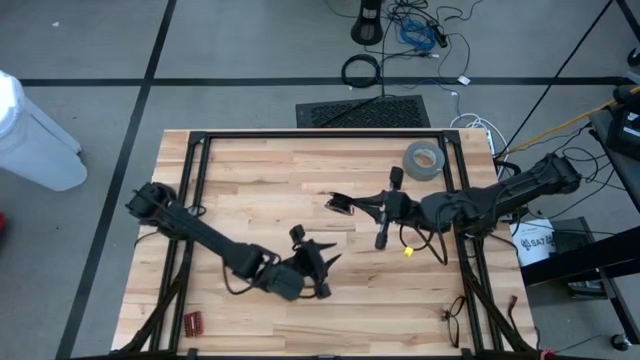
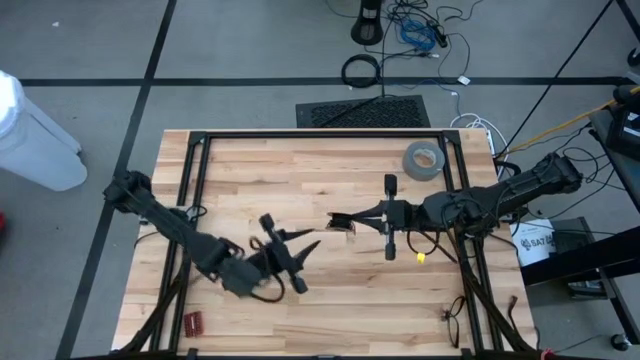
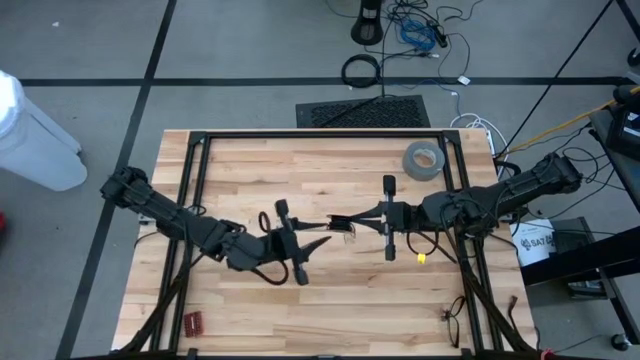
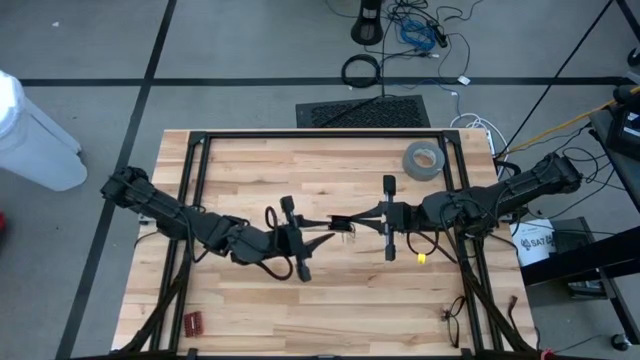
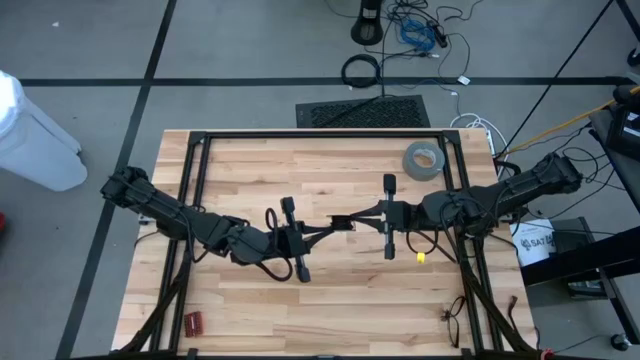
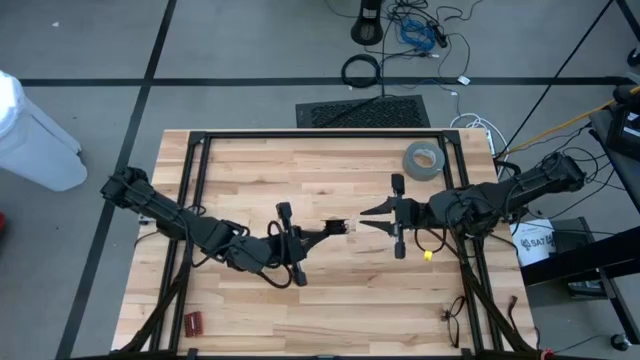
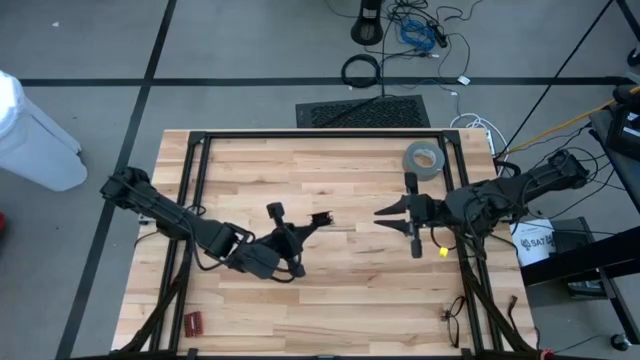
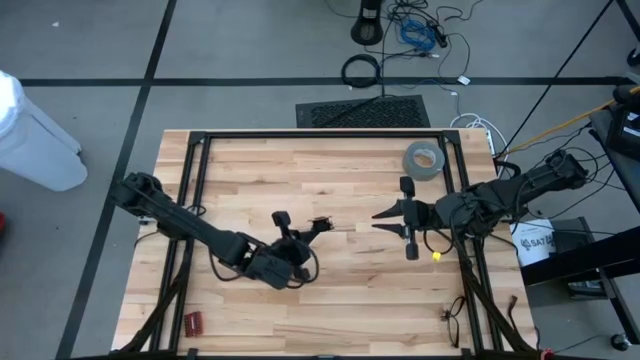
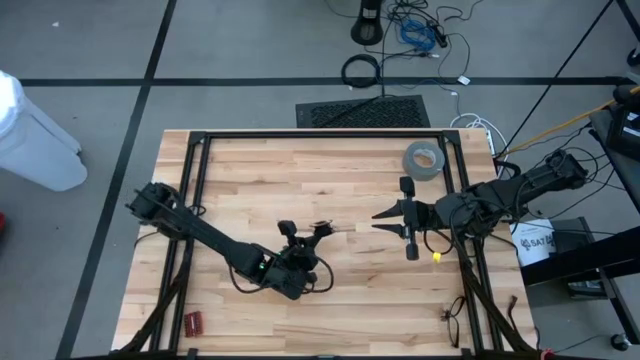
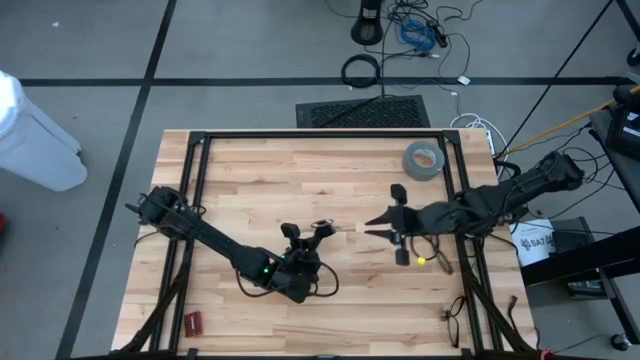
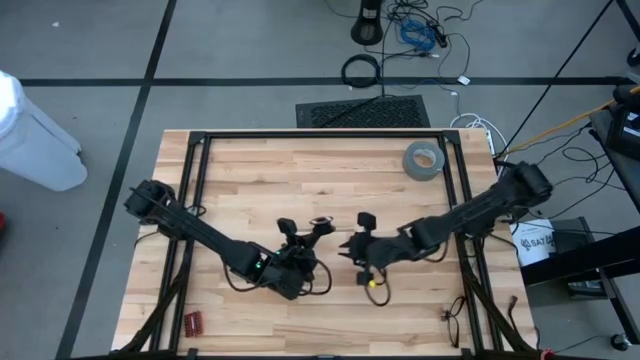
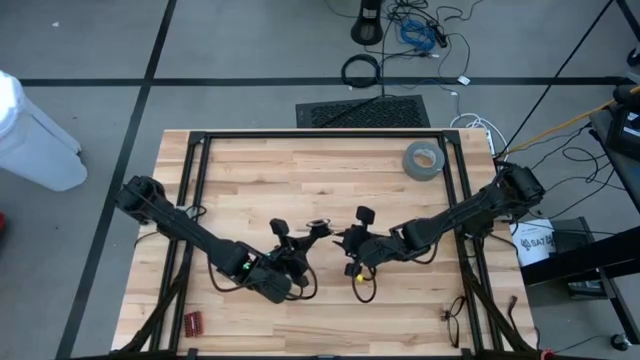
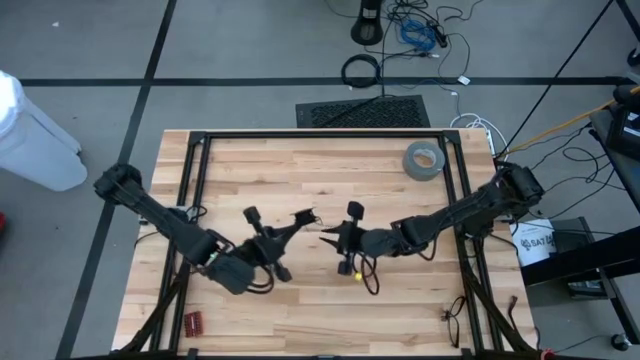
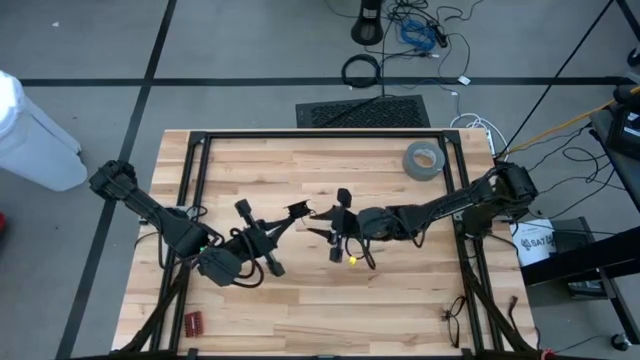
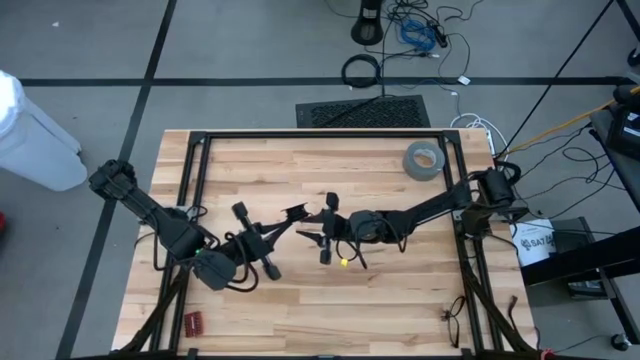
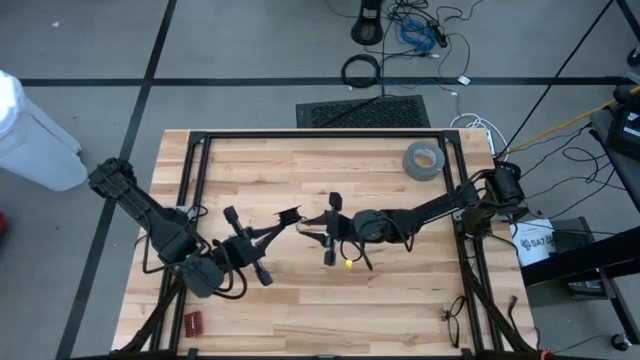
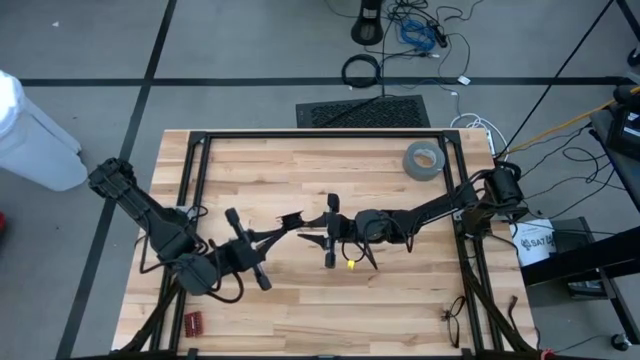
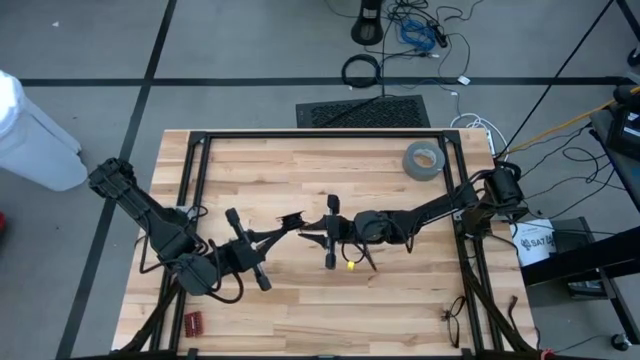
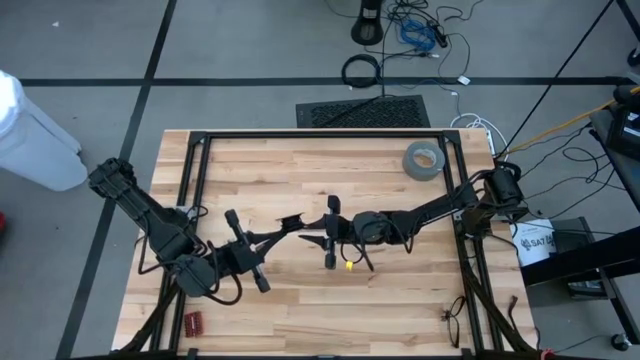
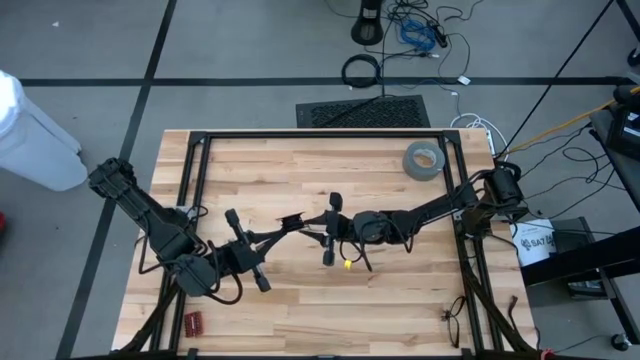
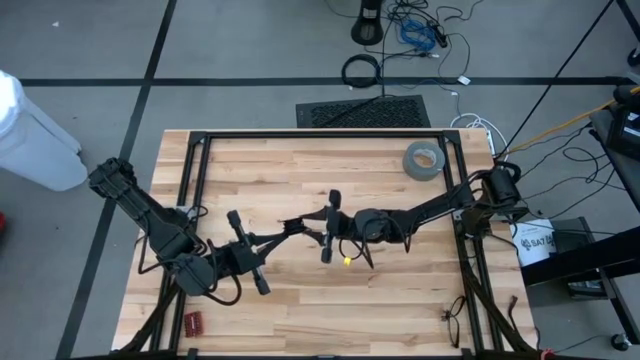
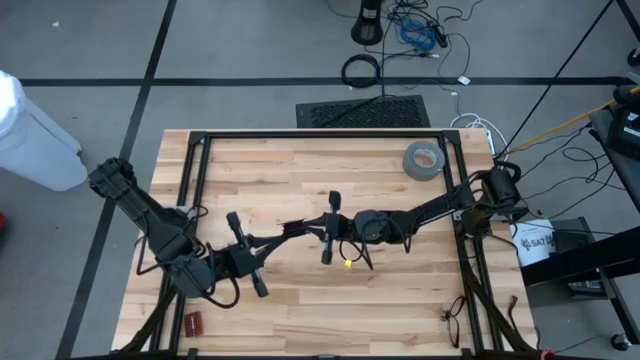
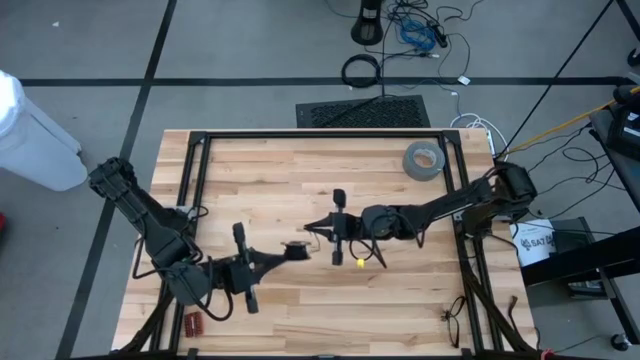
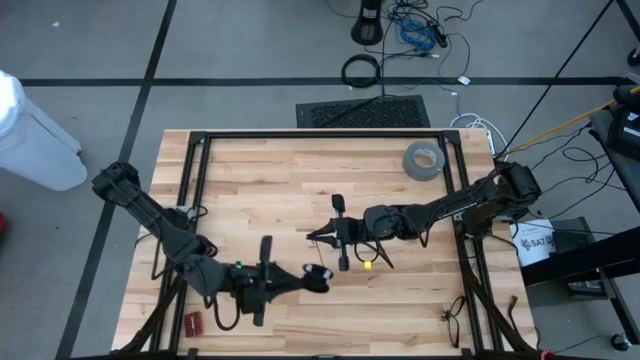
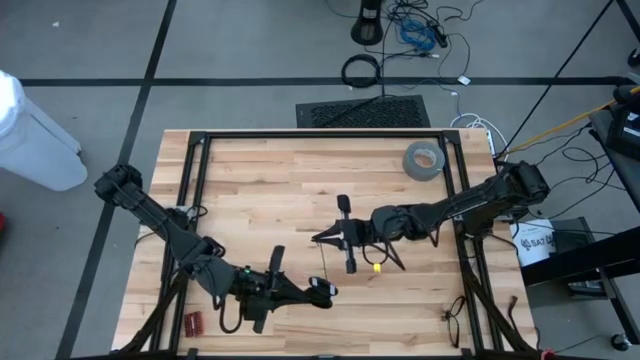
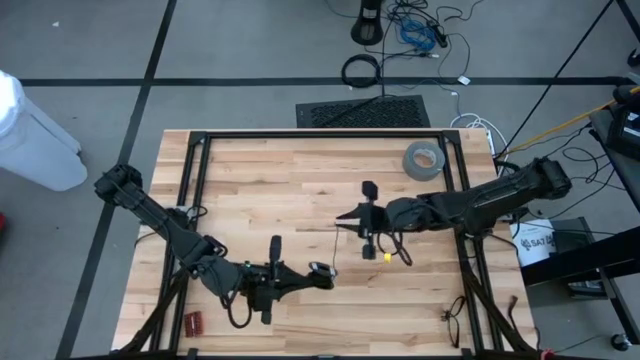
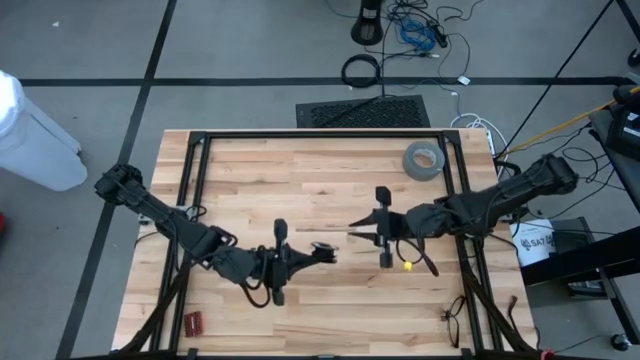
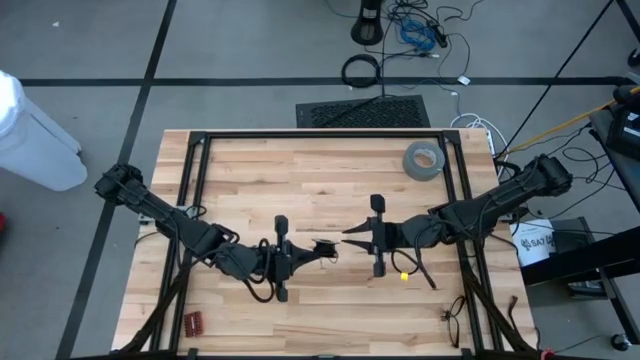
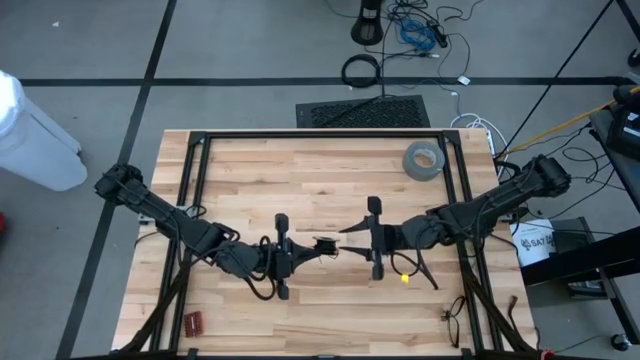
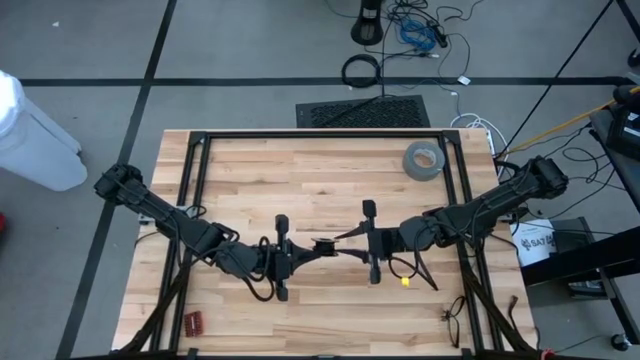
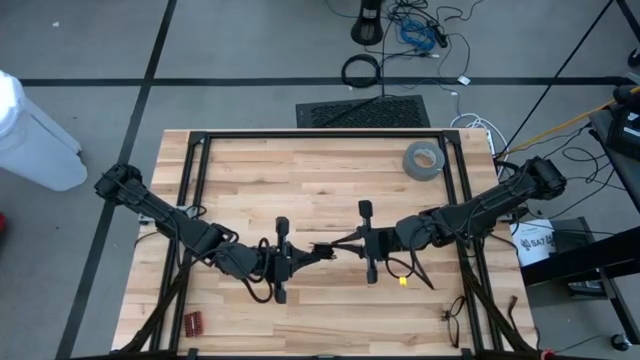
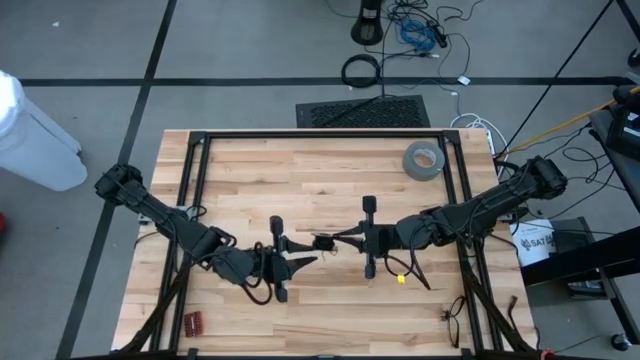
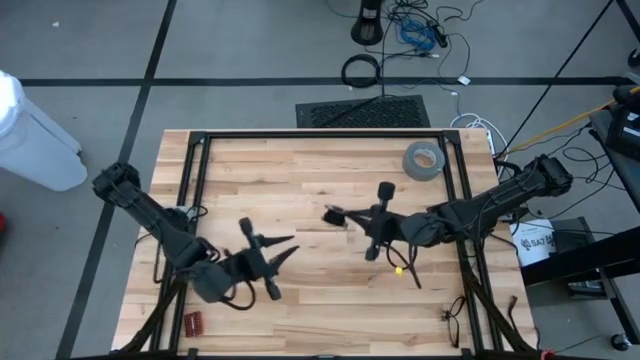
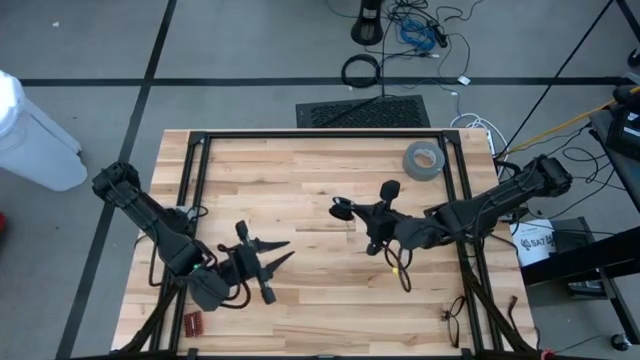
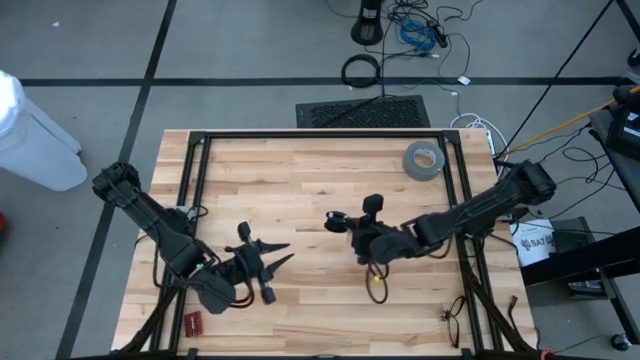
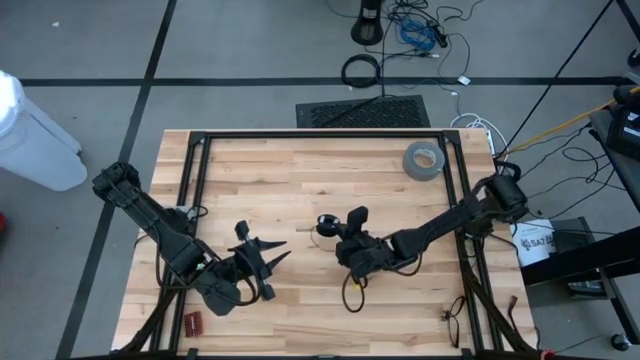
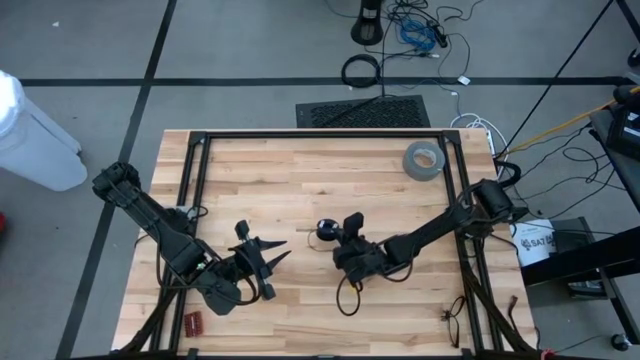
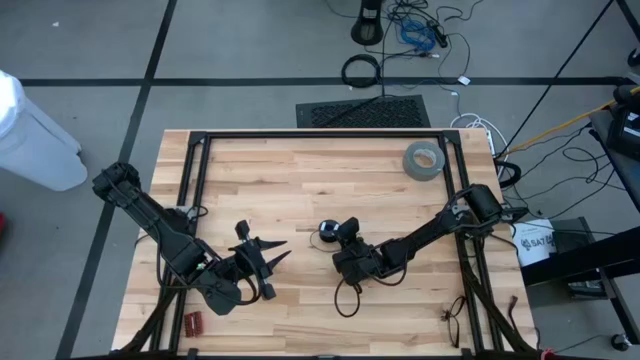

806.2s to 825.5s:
Task: Coil cords
Coil the black wire onto the spool
